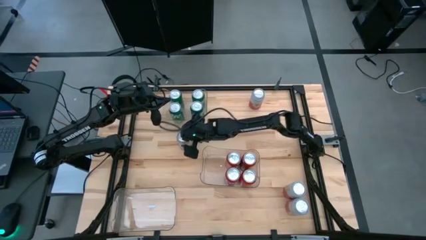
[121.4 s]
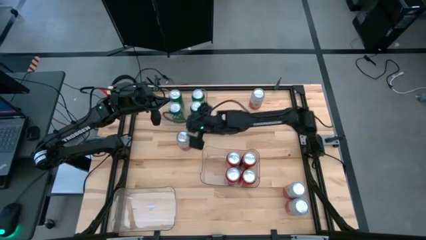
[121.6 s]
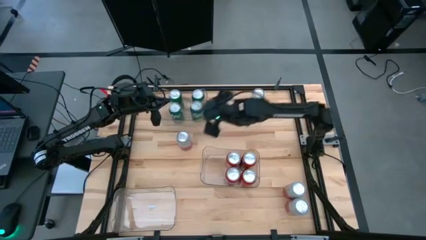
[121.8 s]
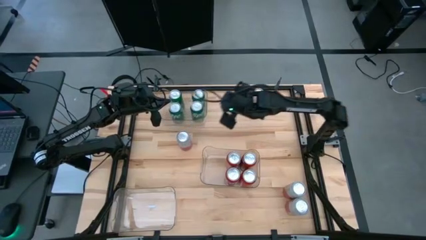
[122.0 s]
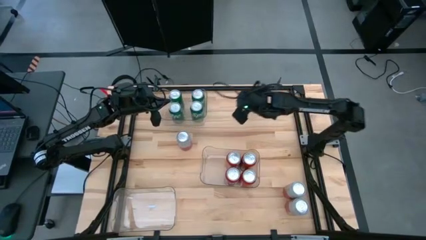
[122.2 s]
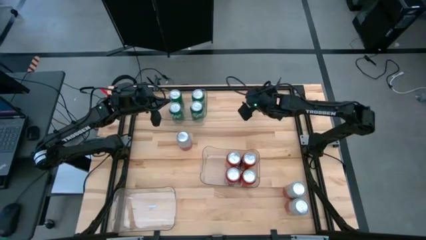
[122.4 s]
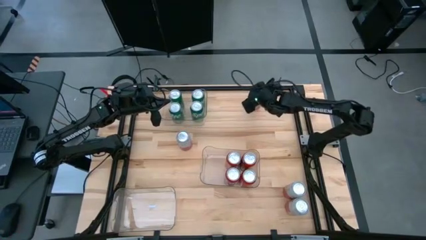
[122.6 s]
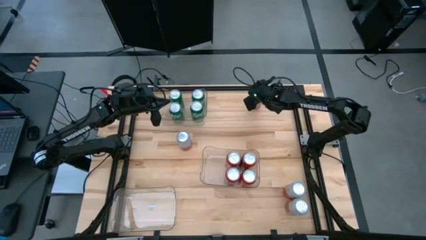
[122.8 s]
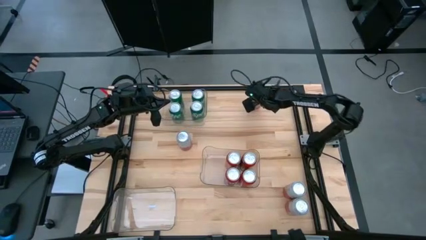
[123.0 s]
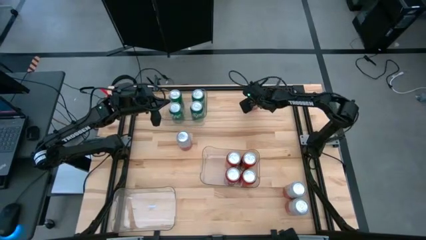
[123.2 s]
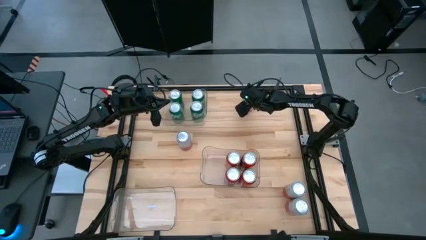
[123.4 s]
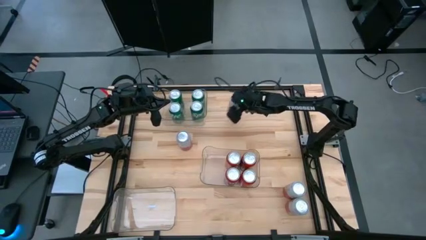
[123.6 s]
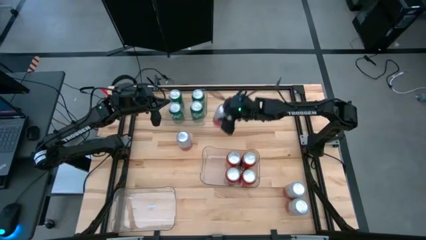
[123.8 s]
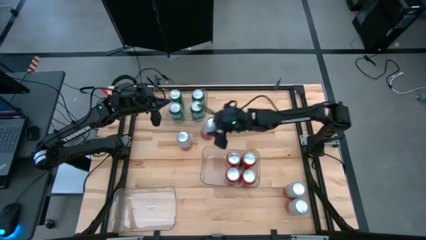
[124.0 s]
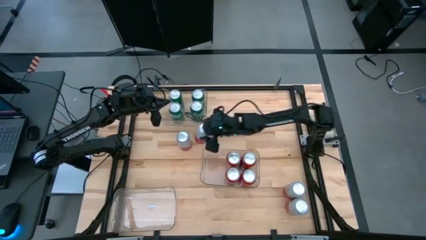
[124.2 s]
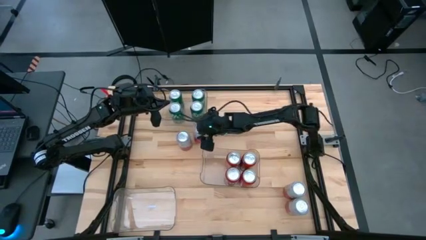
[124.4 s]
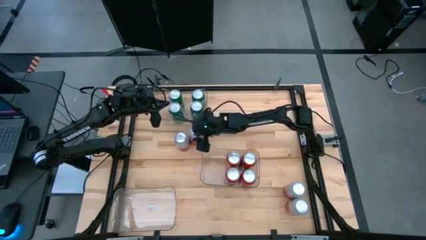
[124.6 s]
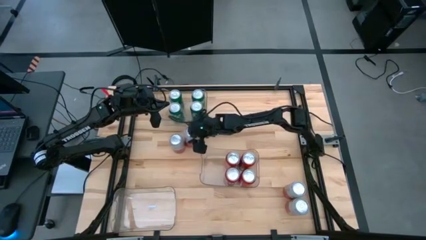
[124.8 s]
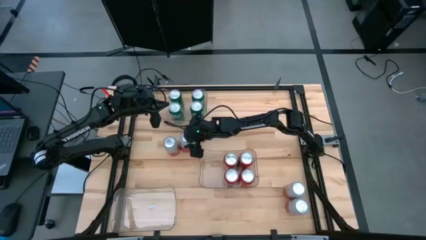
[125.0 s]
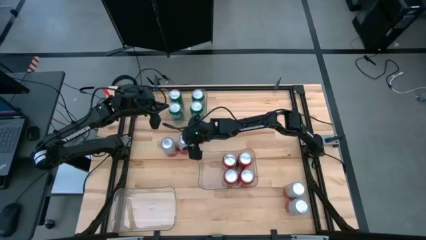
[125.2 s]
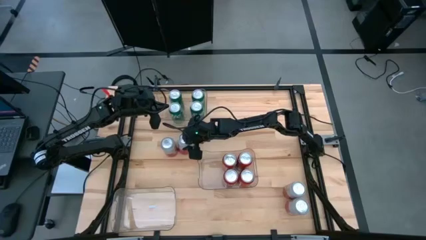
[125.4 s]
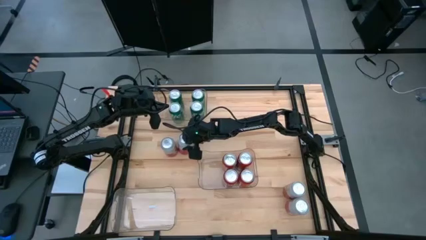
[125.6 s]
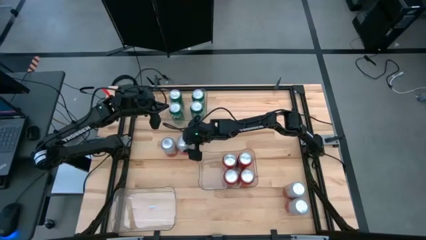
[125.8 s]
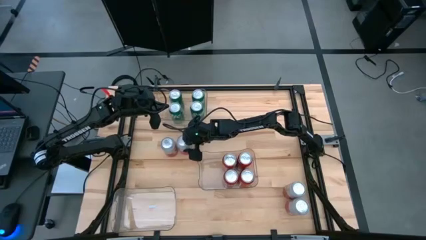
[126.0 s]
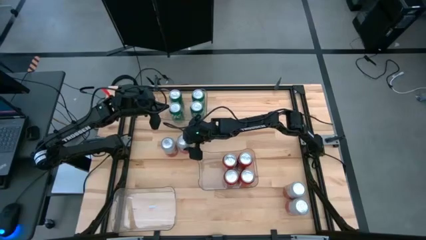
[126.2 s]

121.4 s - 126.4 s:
Task: Sort soda cans
Move the pink white soda can from top right to top left

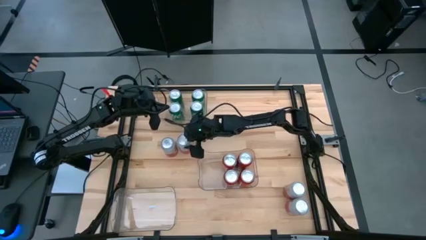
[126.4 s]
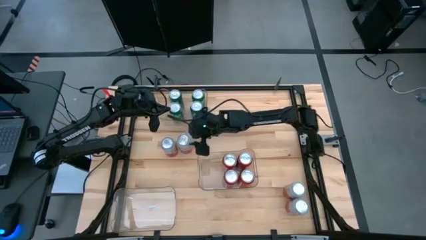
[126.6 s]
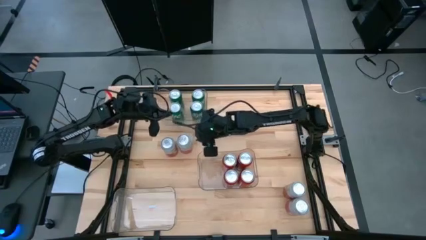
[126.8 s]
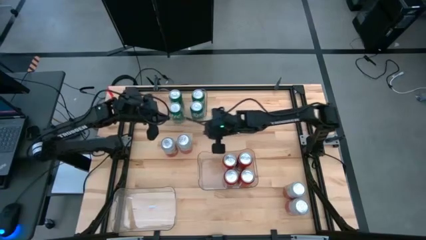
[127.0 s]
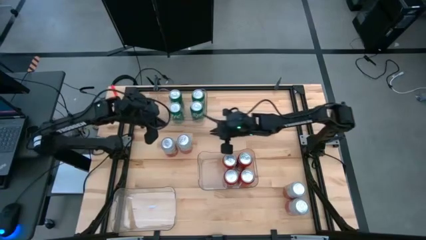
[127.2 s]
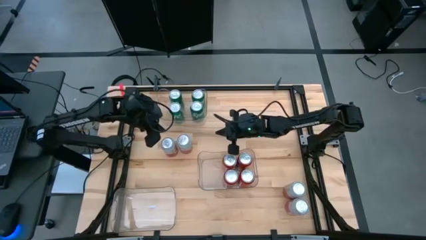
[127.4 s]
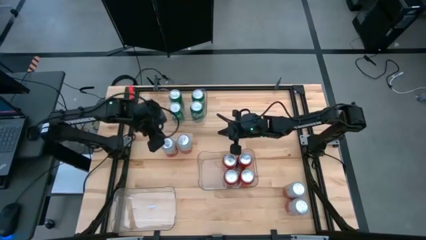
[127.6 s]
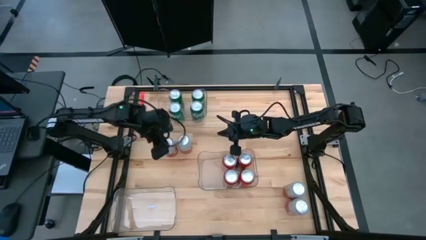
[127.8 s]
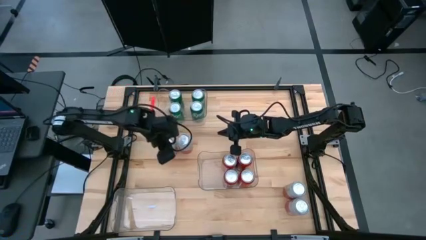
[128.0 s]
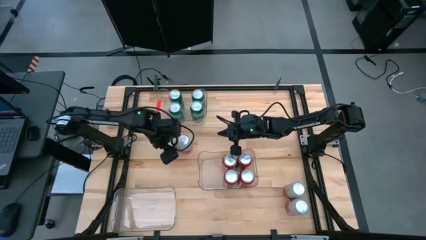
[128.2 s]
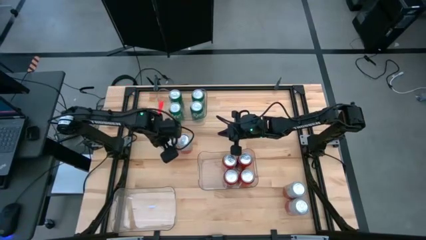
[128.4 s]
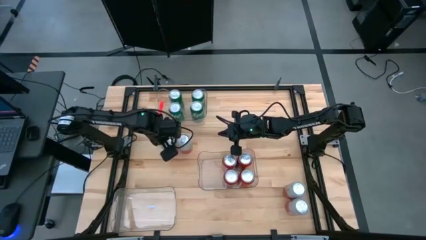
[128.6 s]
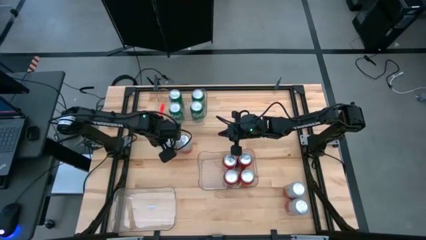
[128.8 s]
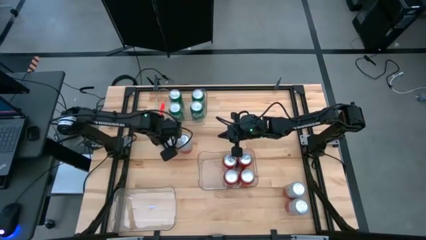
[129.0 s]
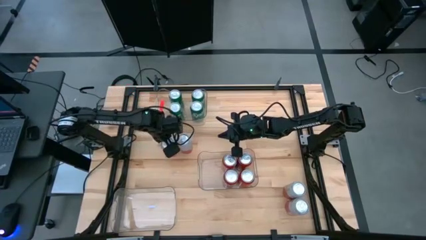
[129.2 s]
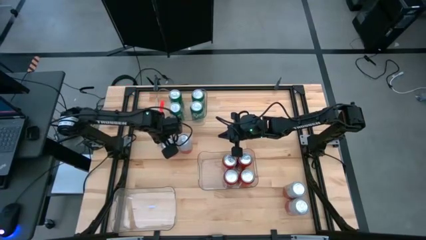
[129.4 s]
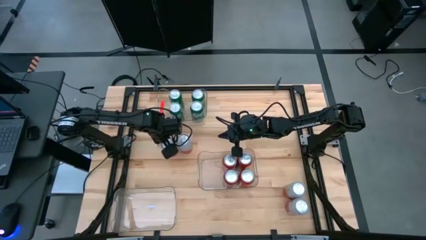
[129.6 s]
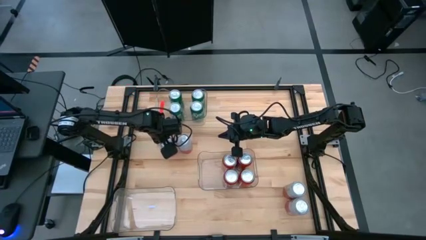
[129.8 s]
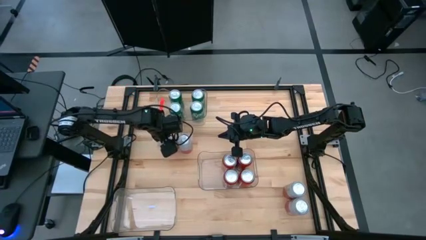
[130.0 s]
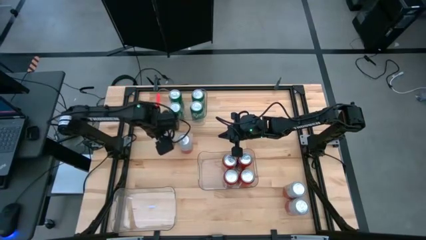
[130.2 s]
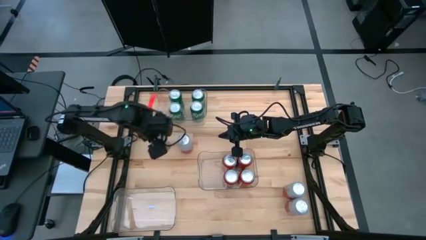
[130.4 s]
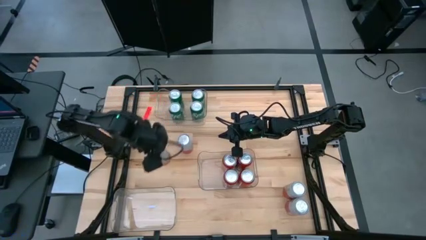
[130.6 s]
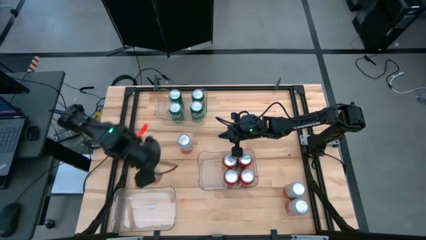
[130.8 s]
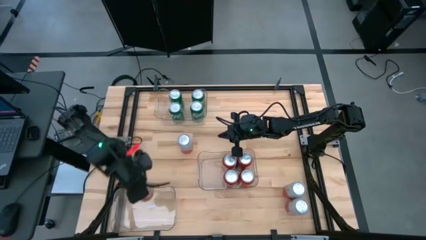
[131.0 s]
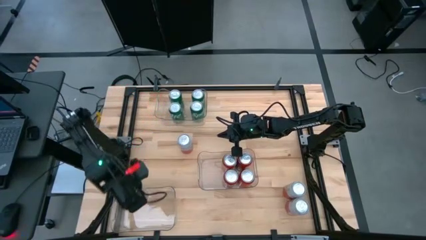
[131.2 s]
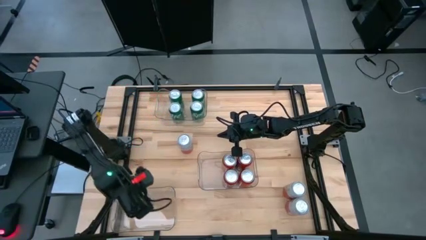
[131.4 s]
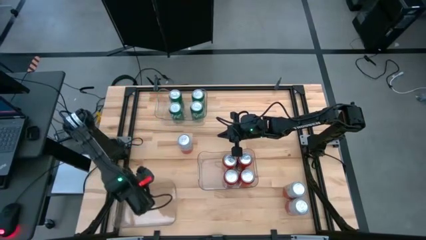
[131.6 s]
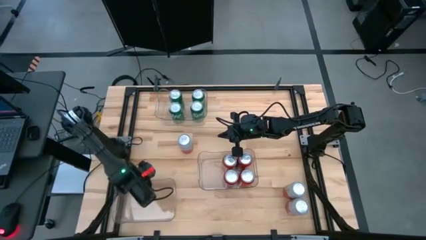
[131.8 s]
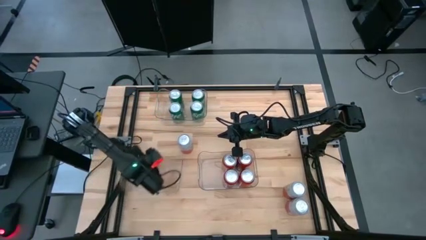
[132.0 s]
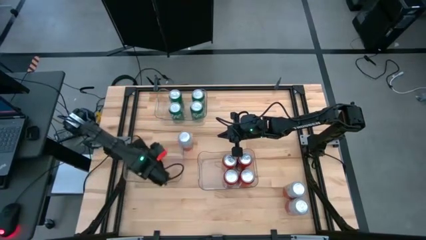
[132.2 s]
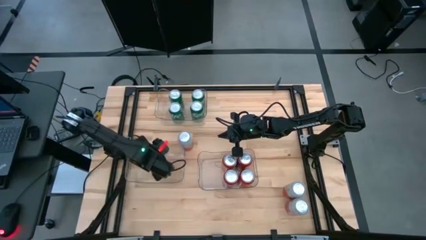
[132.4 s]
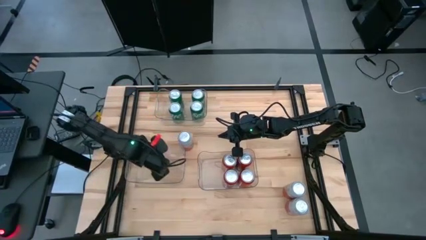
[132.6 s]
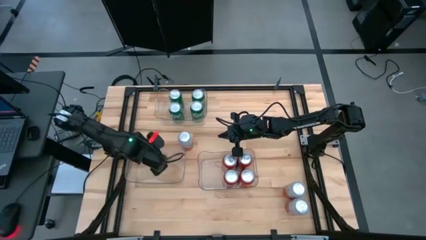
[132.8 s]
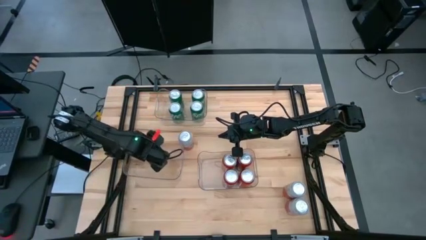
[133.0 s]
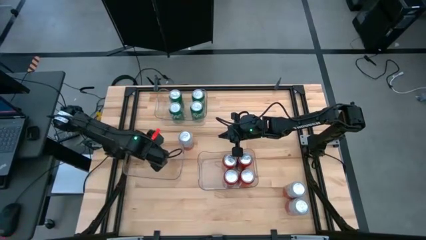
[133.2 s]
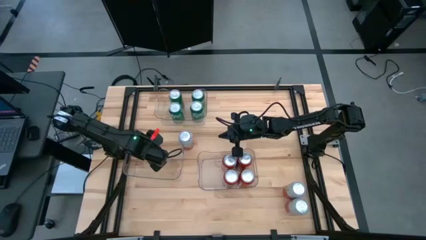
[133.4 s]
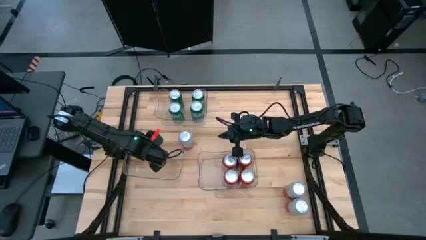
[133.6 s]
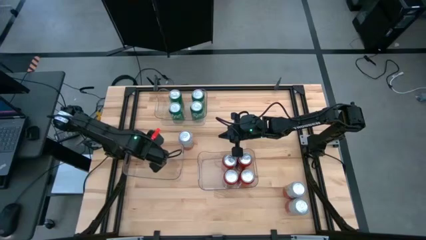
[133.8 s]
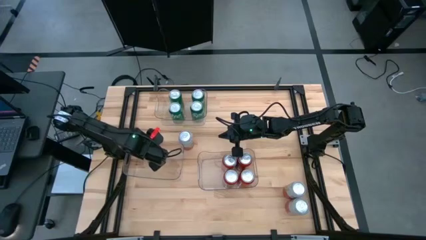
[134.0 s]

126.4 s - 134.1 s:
Put the pink white soda can into the bottom left transparent bin

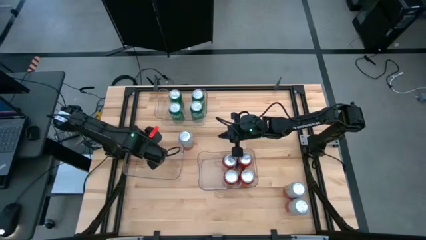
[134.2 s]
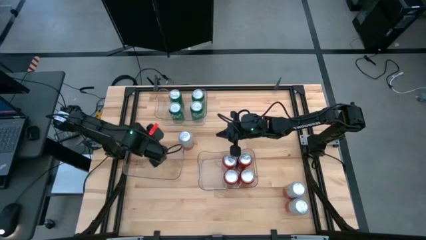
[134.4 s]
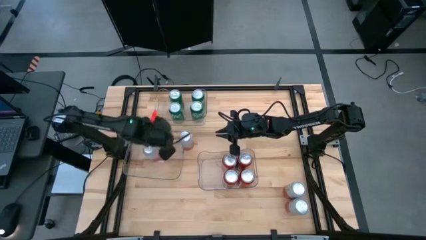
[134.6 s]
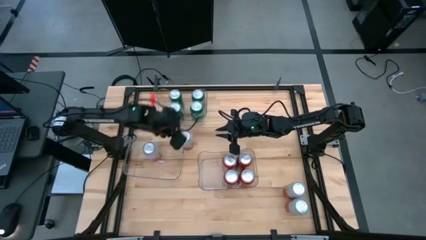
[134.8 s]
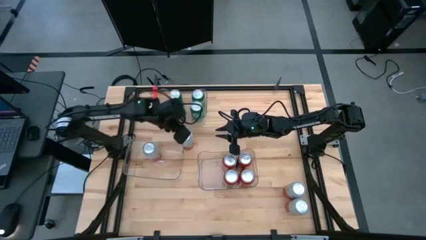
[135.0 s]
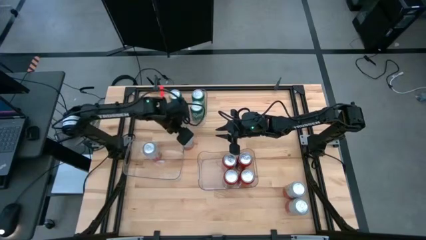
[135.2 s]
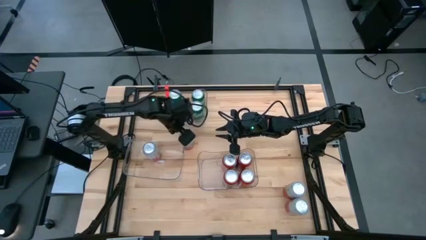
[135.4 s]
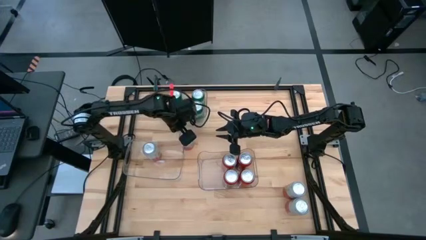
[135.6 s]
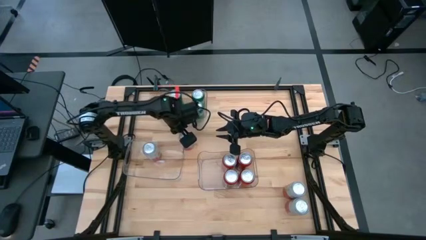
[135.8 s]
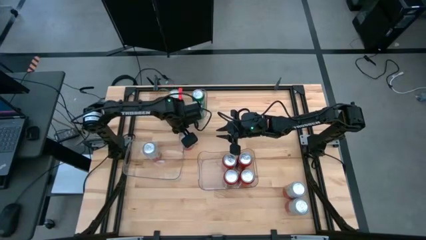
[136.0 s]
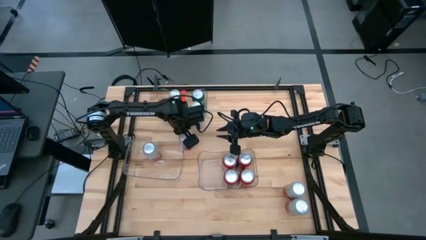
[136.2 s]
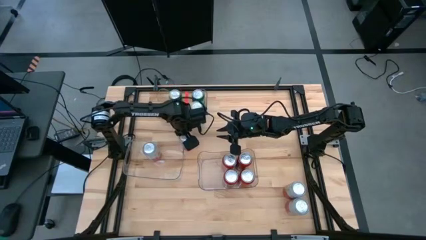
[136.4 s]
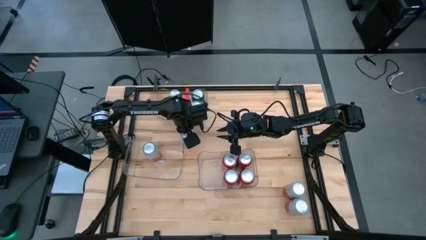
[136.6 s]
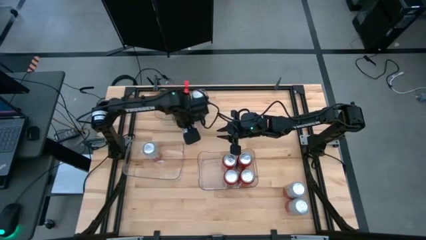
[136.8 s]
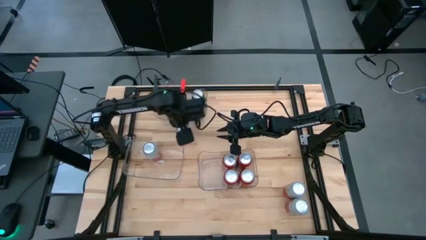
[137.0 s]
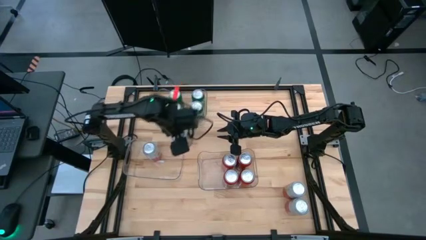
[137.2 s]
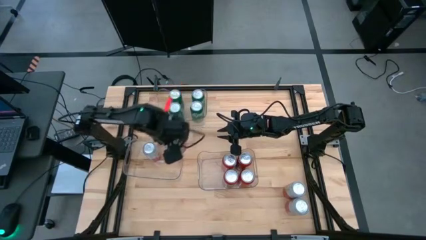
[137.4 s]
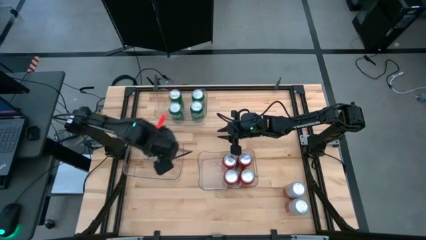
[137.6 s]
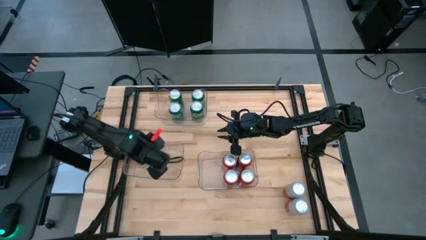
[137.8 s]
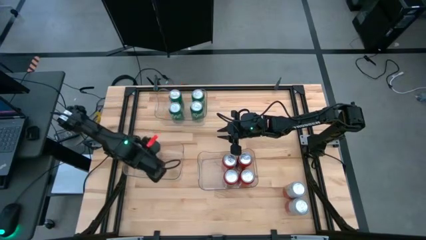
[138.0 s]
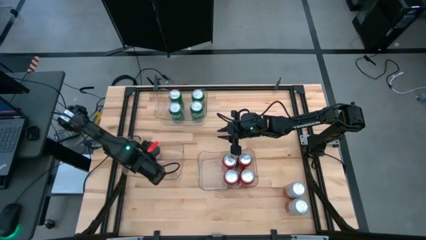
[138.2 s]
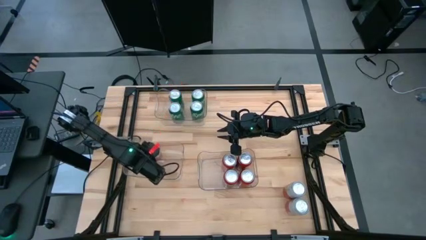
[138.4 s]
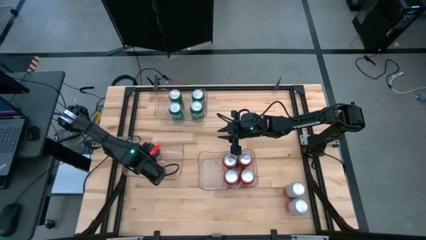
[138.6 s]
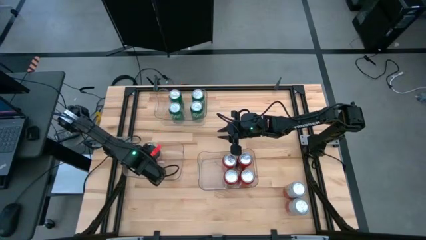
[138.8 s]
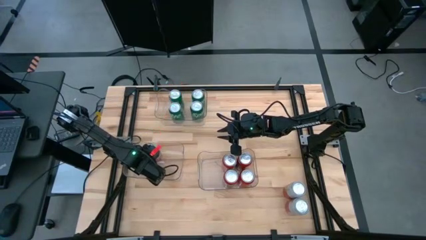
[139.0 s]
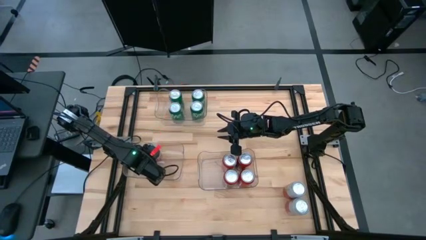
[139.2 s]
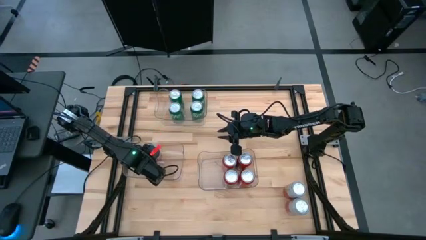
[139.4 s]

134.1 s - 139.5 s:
Put the pink white soda can into the bottom left transparent bin
